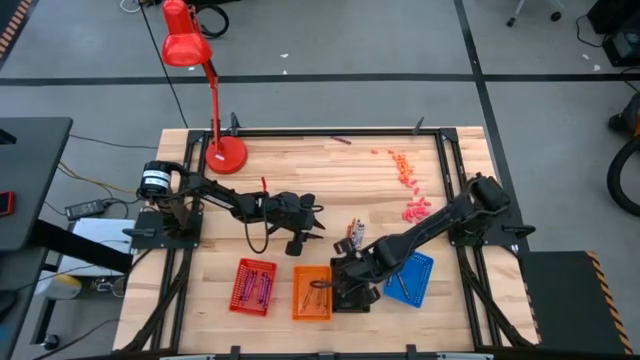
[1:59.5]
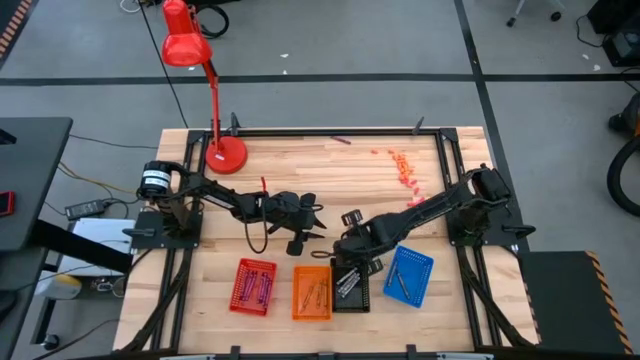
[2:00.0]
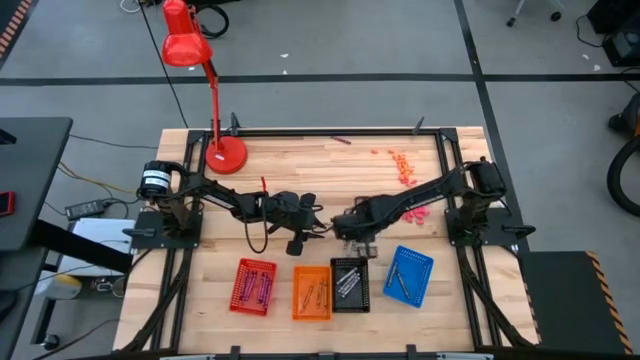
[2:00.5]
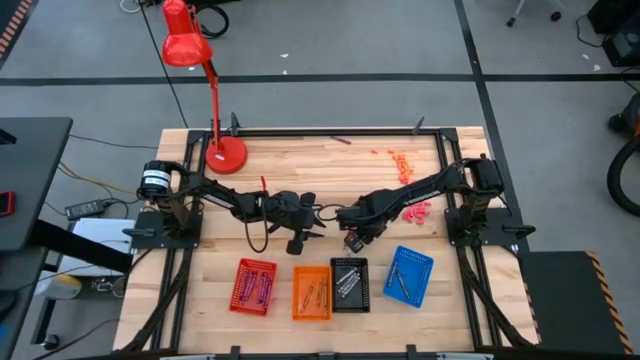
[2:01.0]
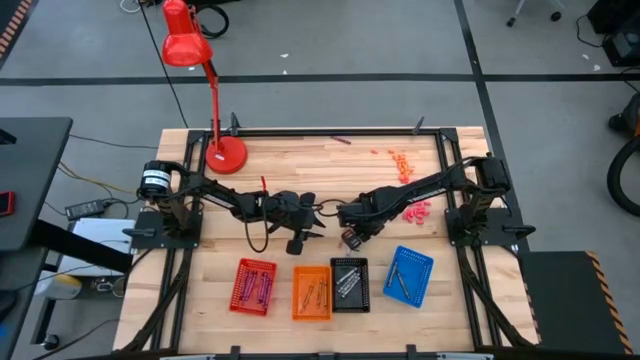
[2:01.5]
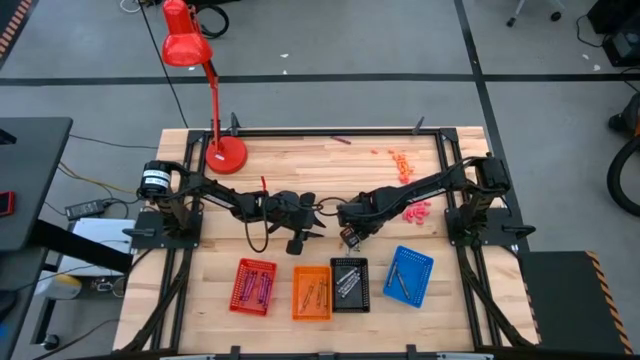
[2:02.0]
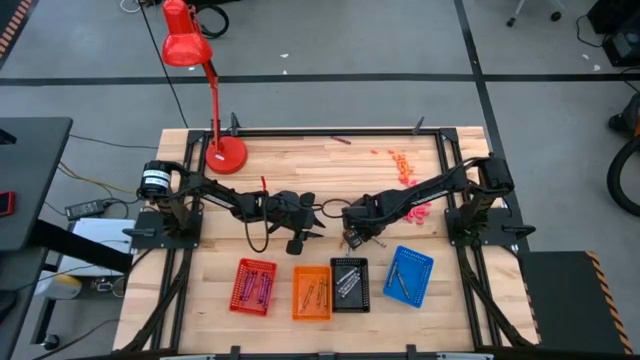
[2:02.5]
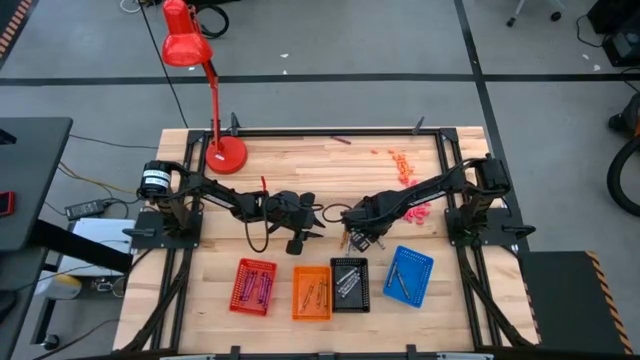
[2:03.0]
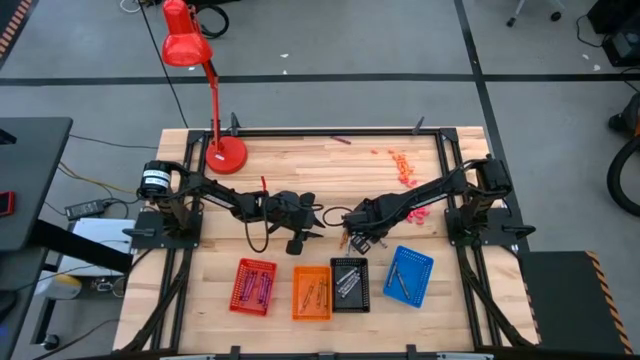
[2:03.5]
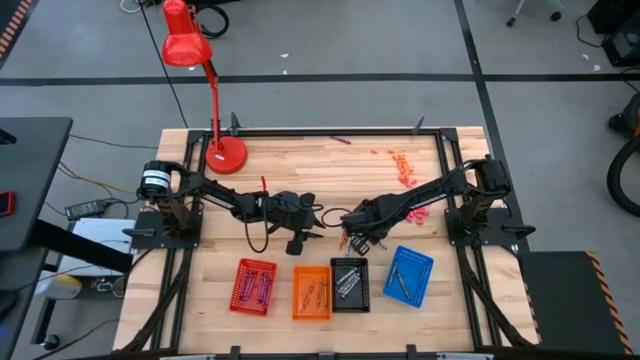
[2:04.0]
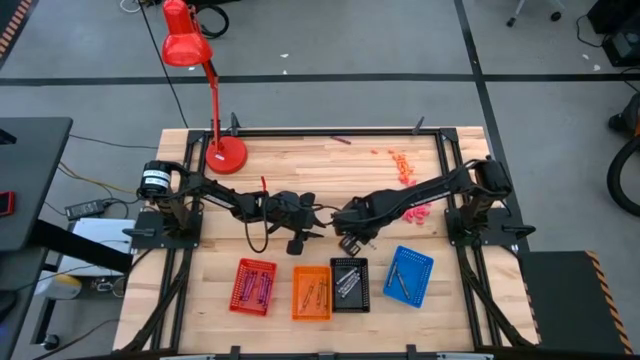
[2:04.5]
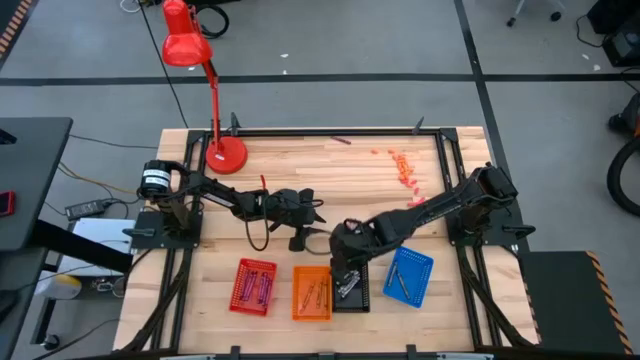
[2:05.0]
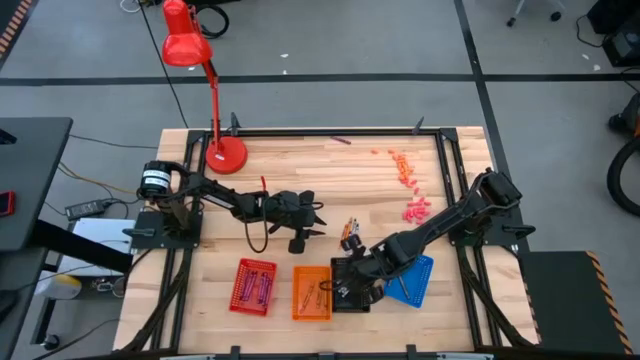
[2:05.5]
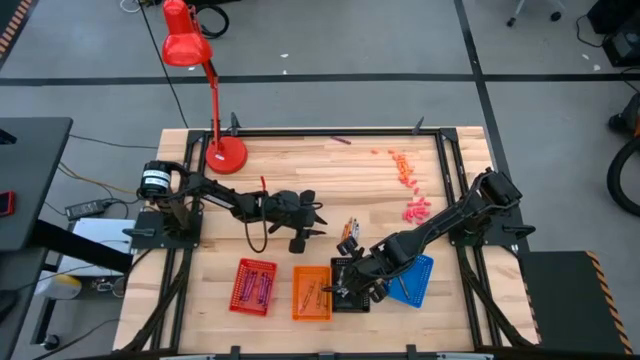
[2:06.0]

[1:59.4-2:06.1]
Task: Sort crayons
Put the black crayon into the black bin

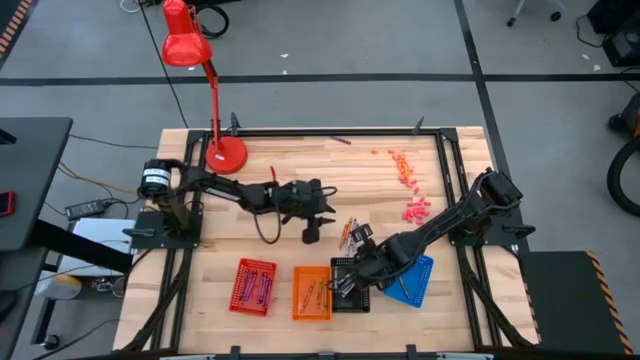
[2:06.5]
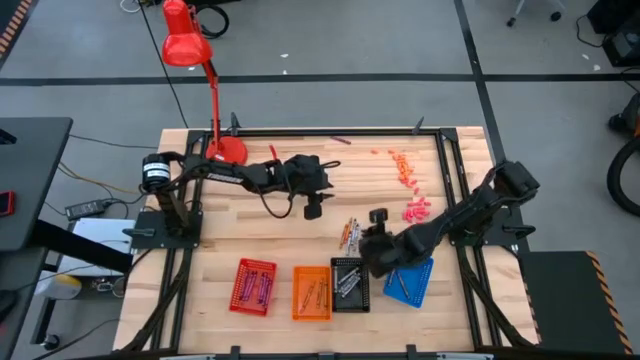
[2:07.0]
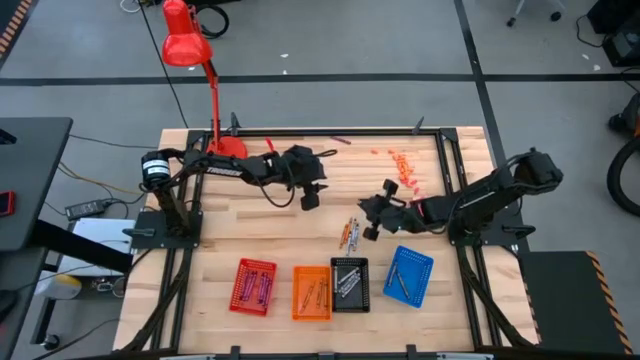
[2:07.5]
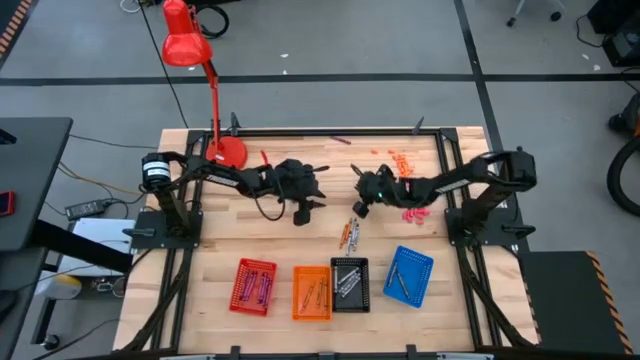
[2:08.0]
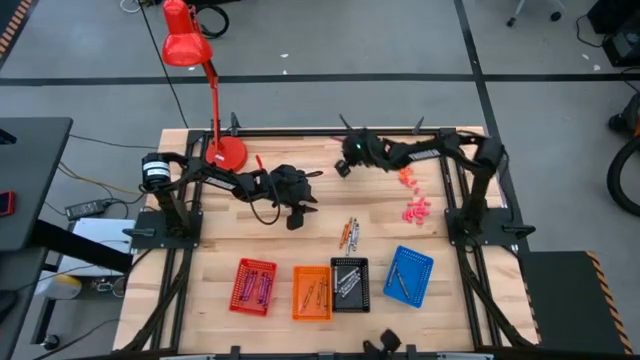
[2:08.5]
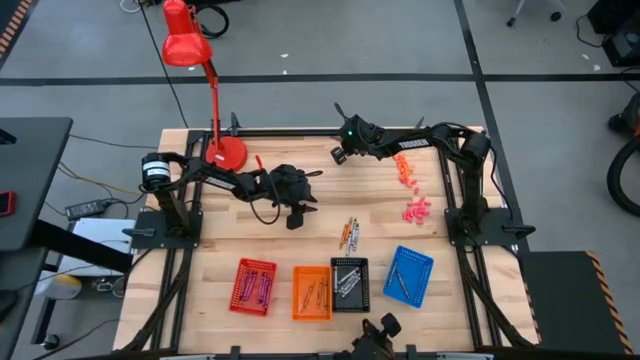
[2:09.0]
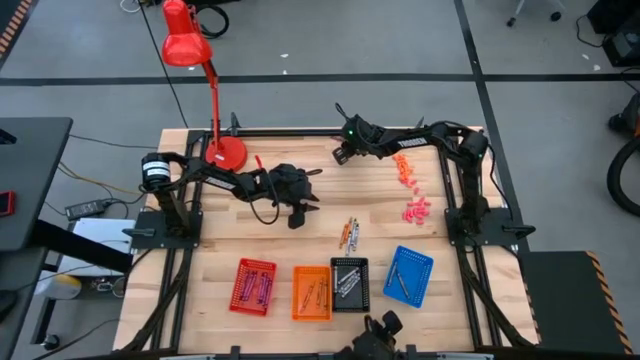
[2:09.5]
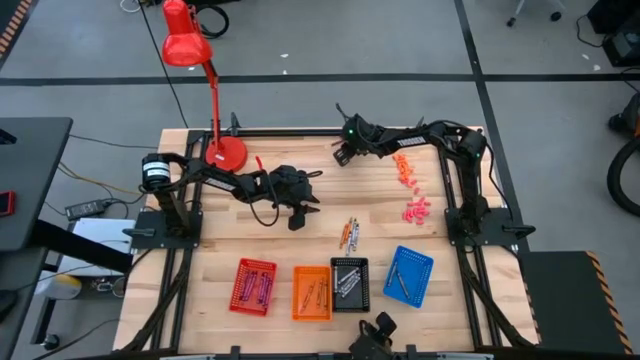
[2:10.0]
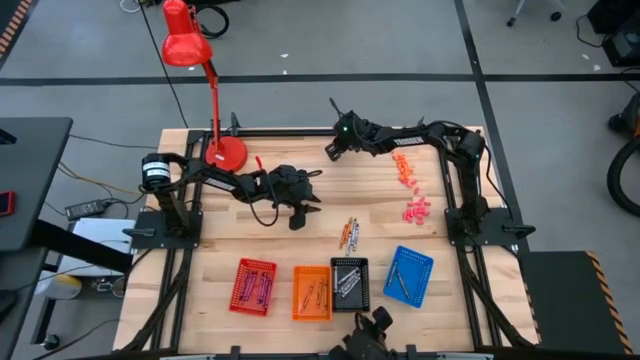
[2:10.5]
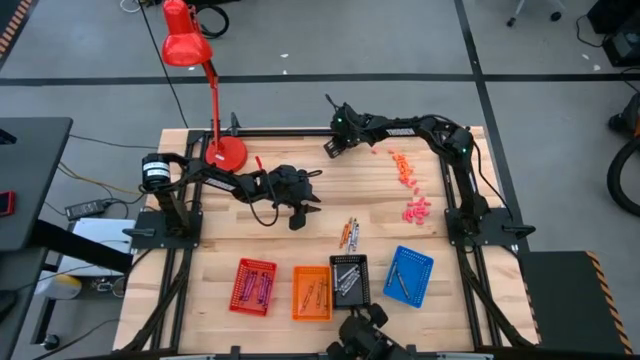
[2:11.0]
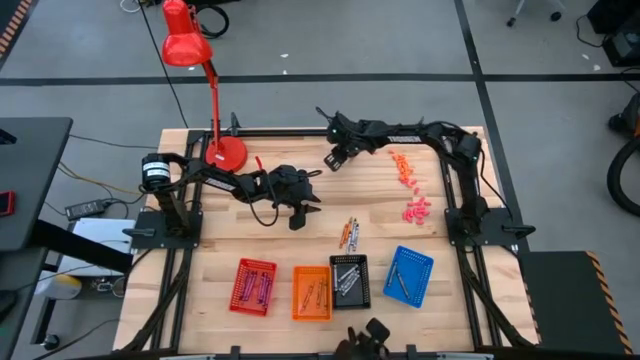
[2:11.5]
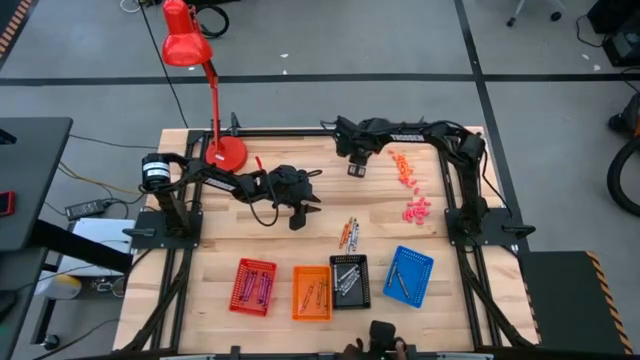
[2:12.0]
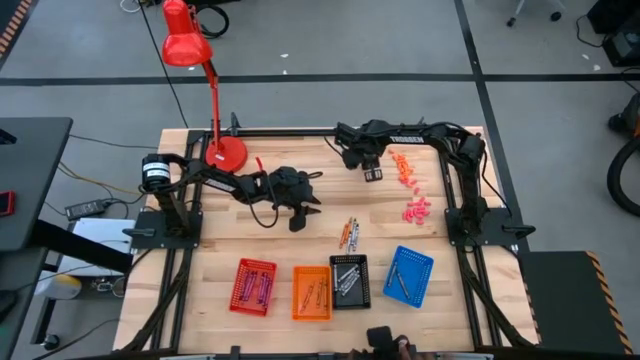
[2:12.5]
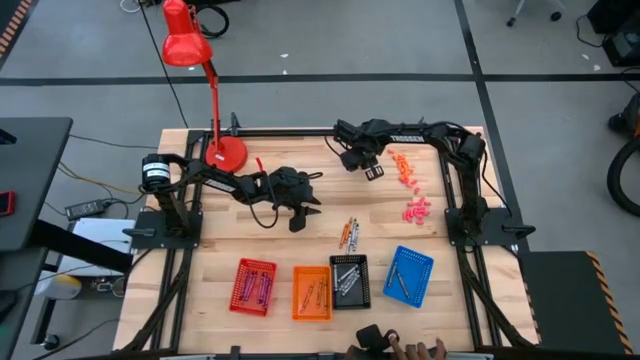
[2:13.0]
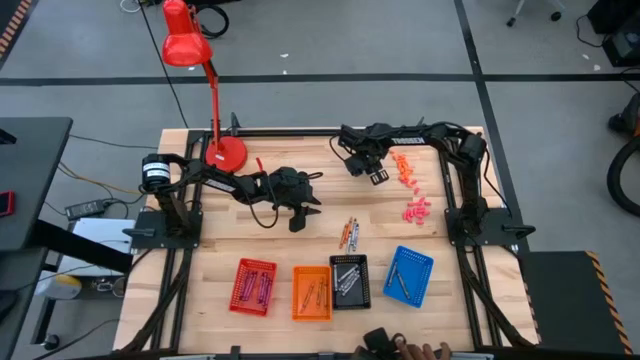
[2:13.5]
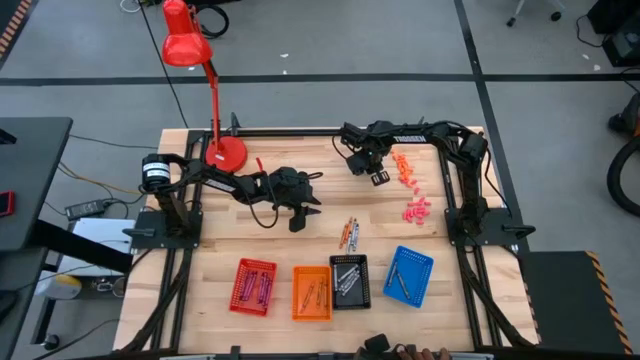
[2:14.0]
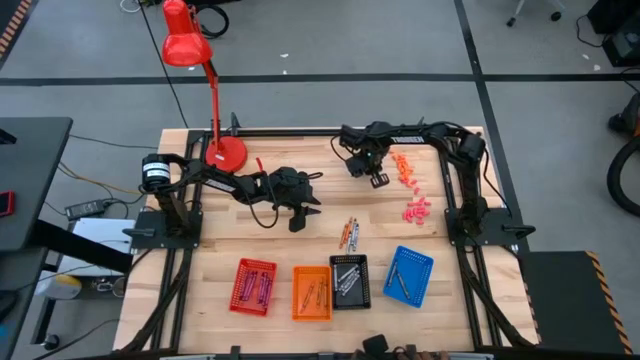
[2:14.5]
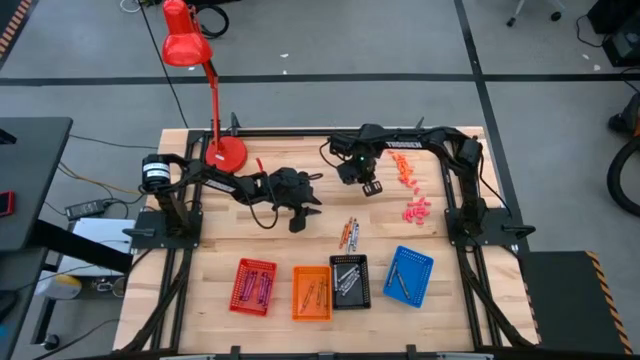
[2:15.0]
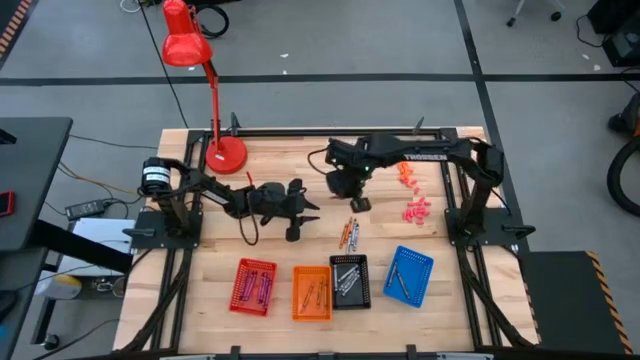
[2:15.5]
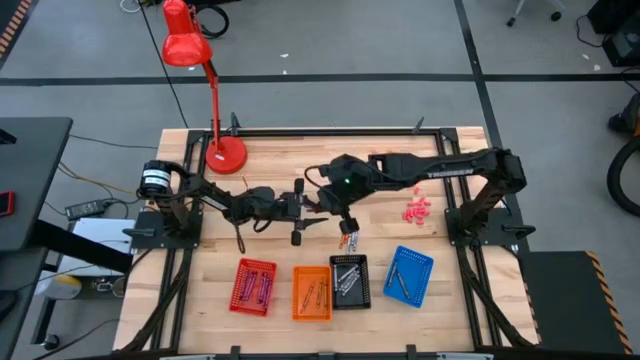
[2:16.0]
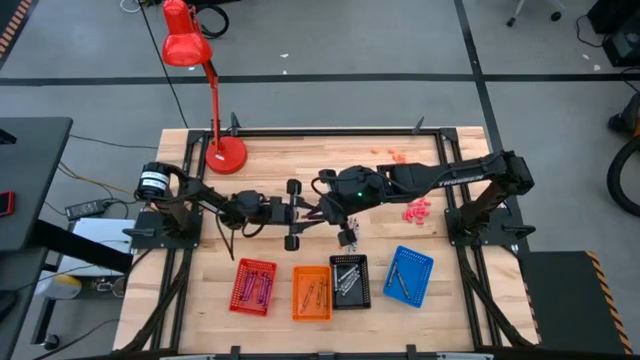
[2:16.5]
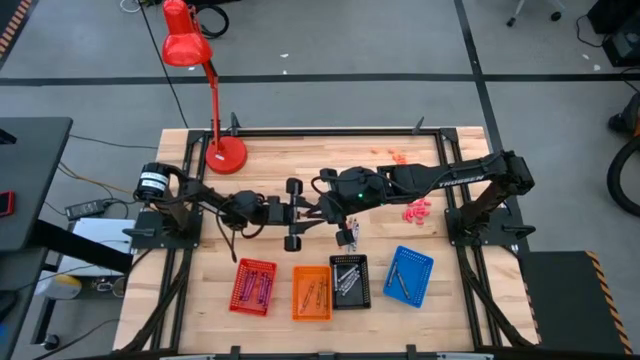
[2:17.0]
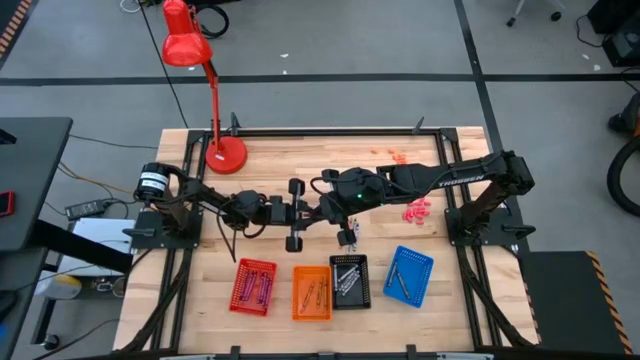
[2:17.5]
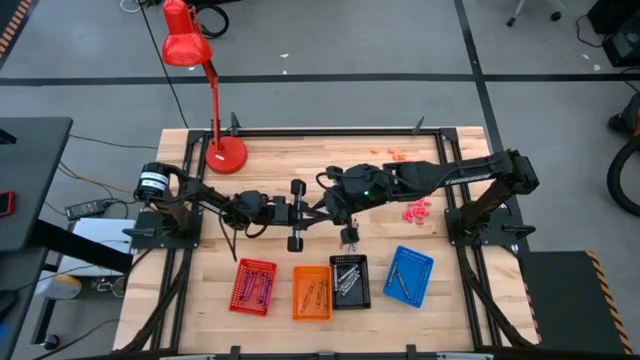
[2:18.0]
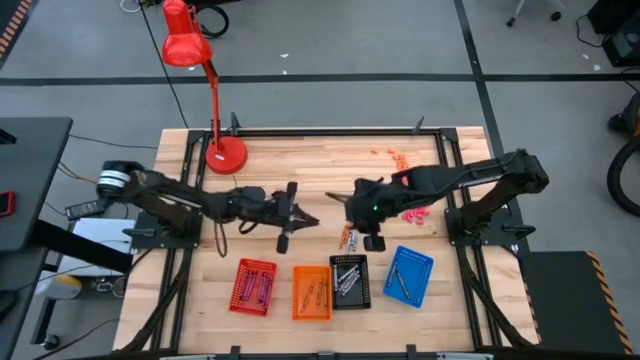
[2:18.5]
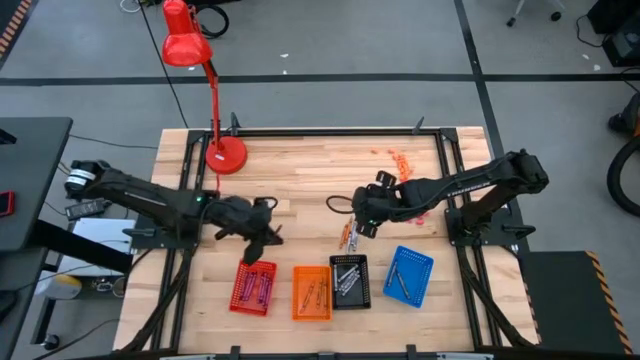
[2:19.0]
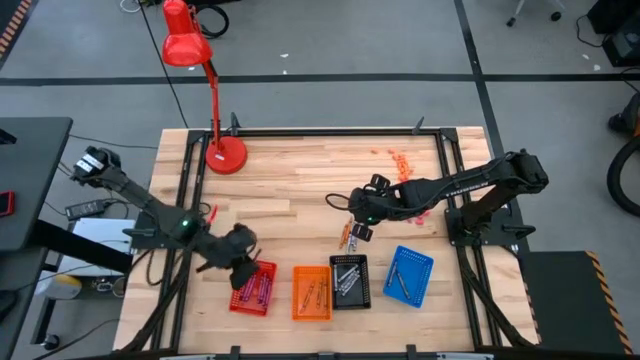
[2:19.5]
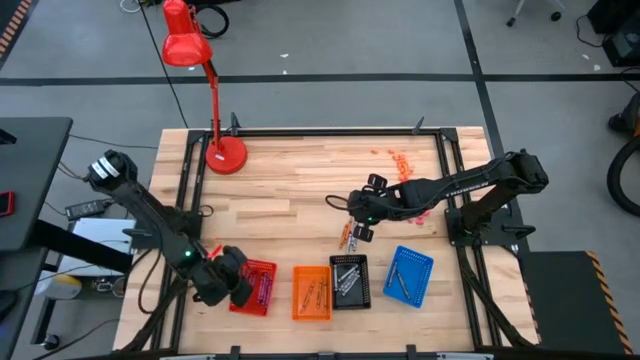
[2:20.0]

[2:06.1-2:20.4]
Put the violet crayon into the red bin
